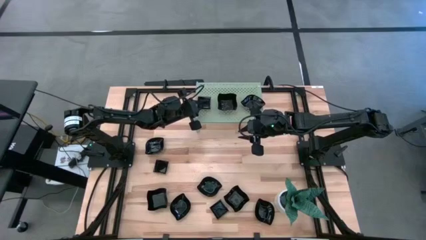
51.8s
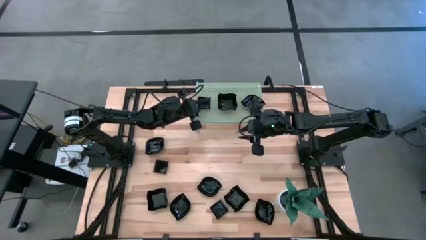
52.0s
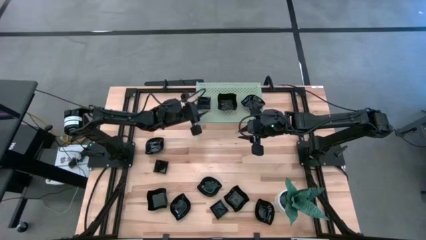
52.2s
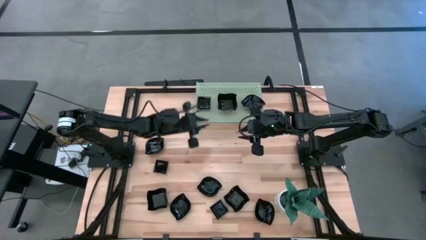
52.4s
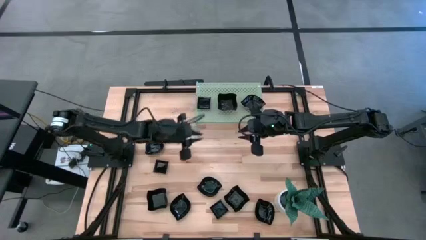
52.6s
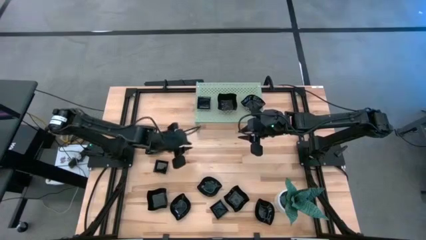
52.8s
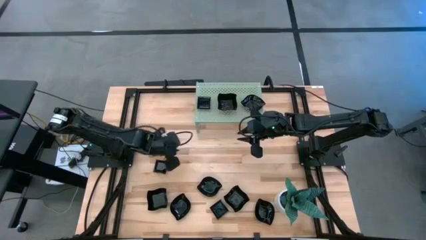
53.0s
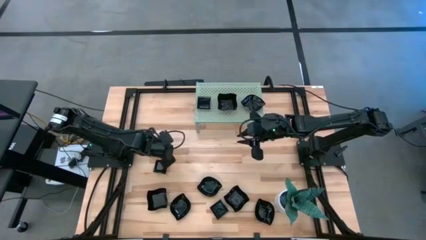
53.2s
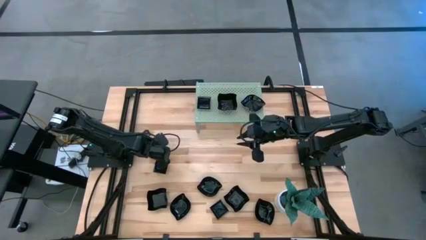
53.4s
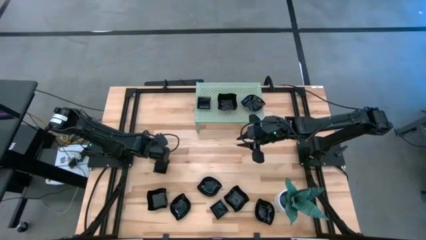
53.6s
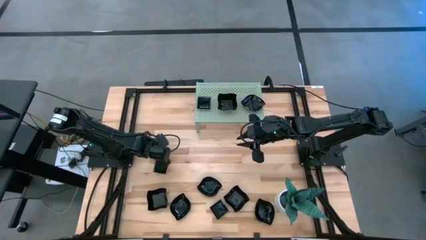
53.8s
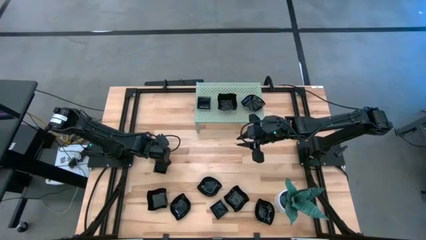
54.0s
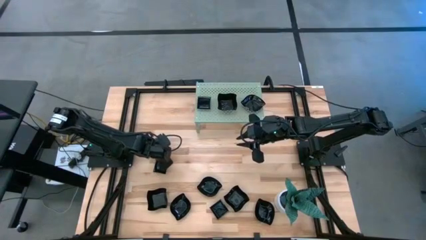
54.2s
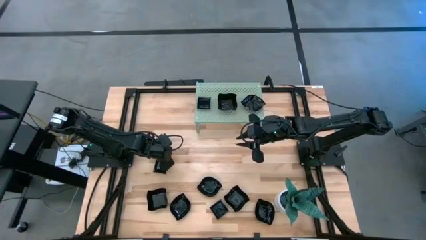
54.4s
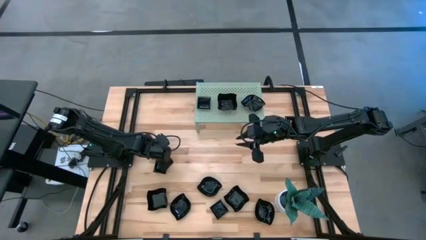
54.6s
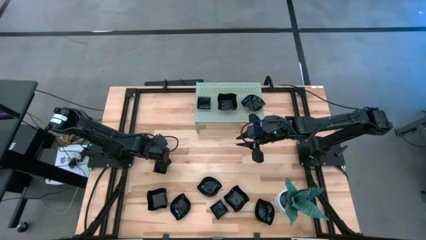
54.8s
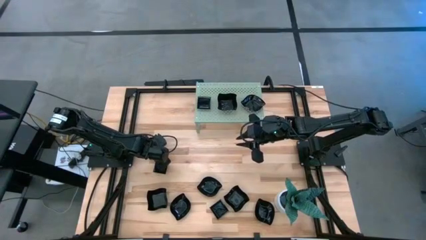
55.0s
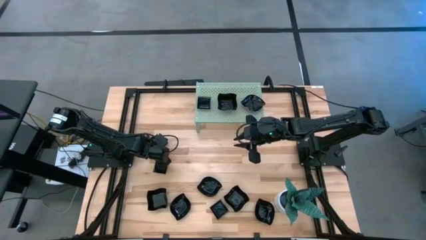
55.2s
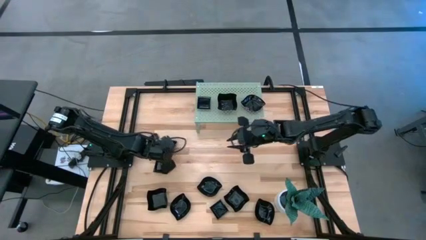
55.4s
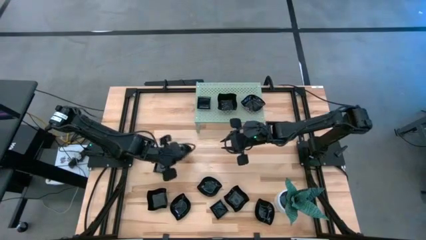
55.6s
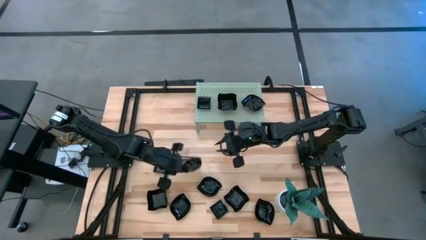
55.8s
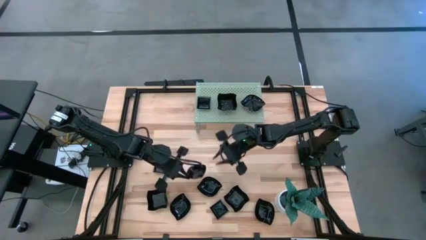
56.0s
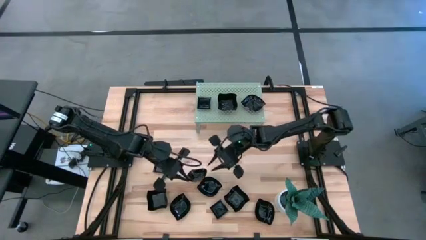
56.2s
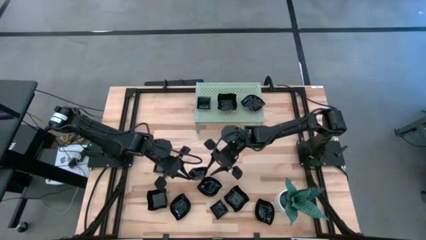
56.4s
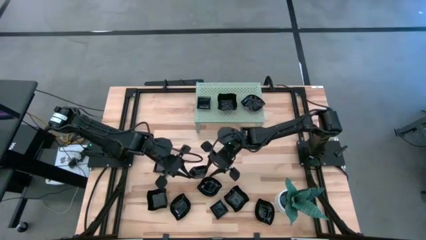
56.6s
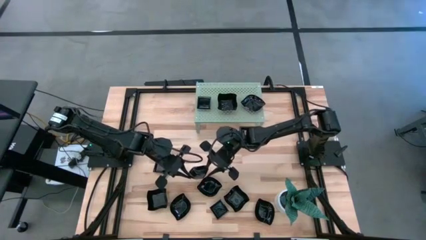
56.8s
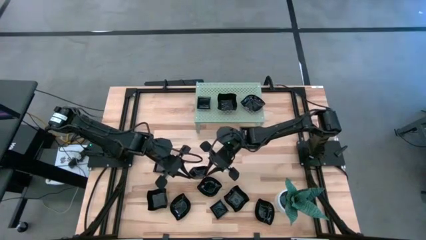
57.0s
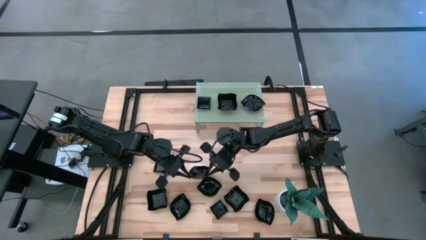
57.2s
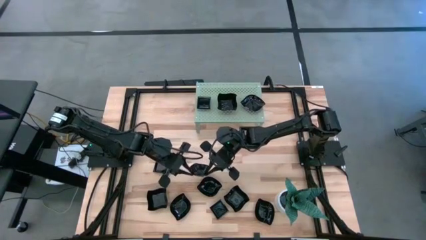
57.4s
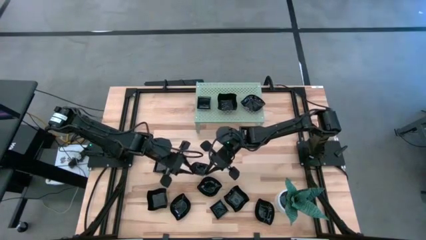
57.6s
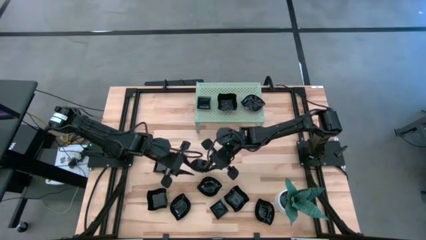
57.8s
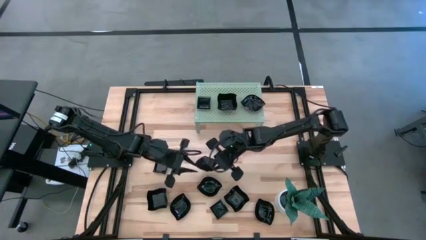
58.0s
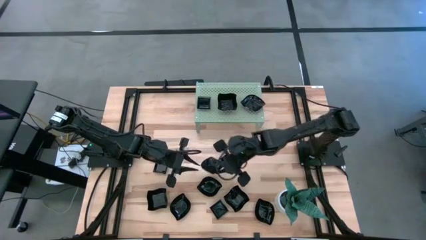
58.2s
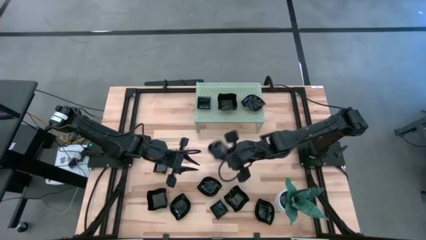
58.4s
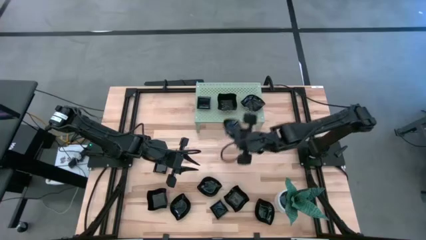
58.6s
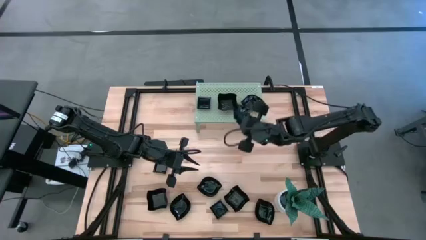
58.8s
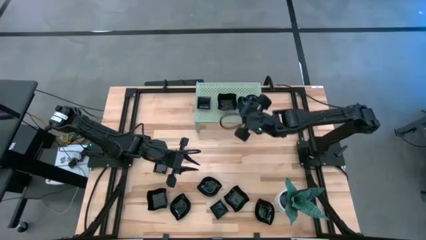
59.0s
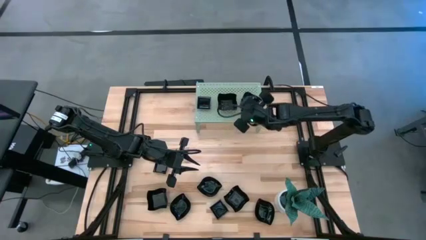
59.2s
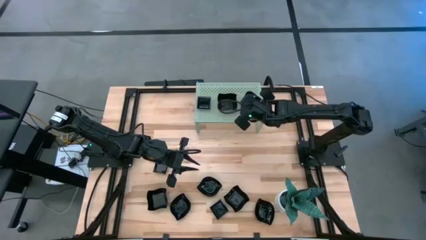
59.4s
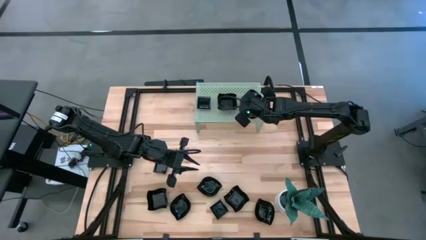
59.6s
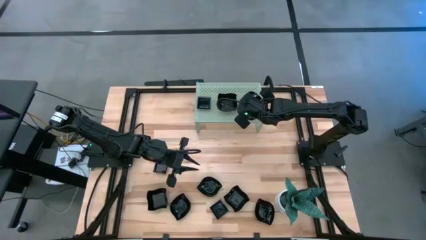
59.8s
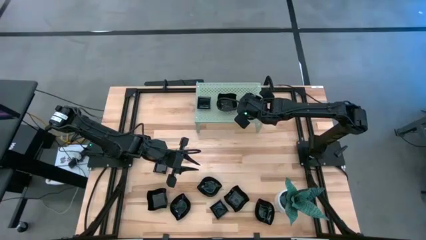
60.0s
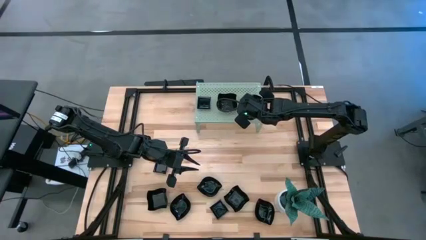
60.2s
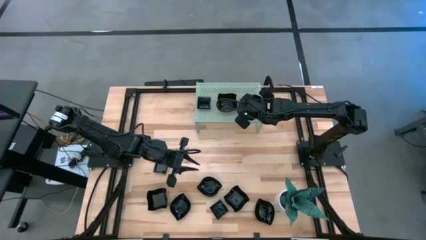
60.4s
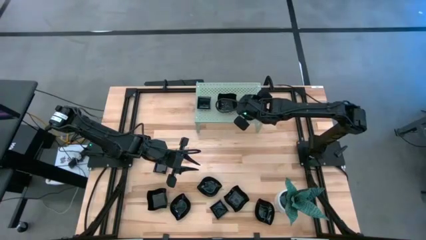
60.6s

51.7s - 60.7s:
Task: Pick & Place Mini shaped plates
Stack the leaf shaped plate on top of the other leaf shaped plate on the shelf

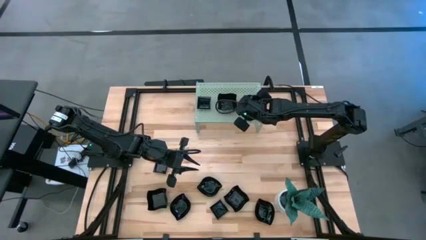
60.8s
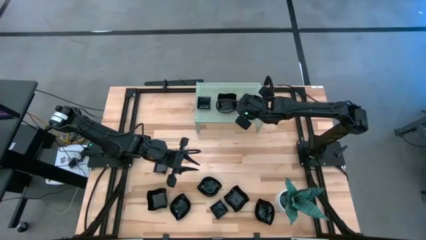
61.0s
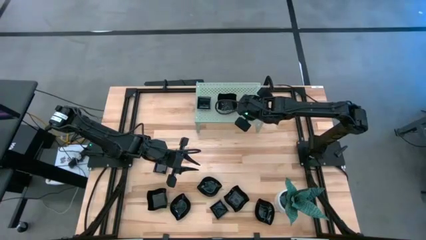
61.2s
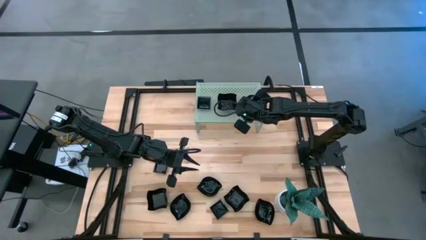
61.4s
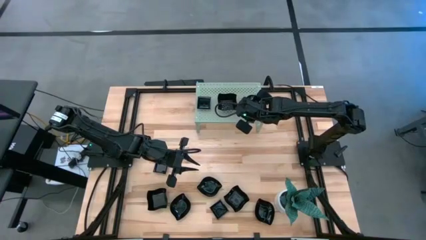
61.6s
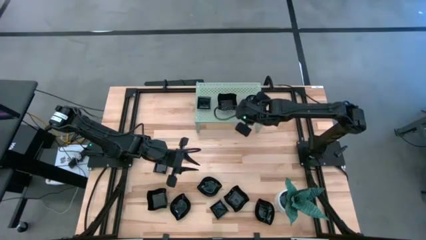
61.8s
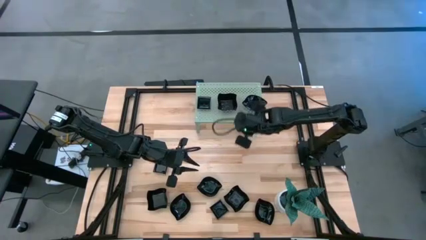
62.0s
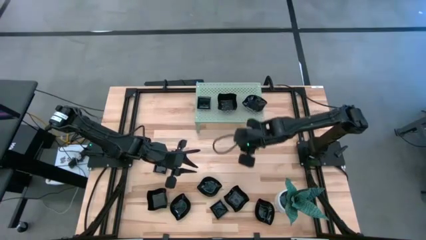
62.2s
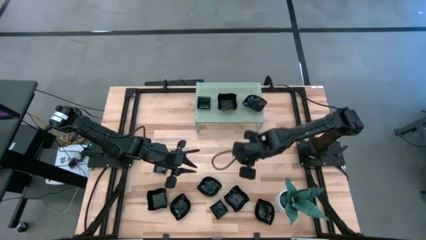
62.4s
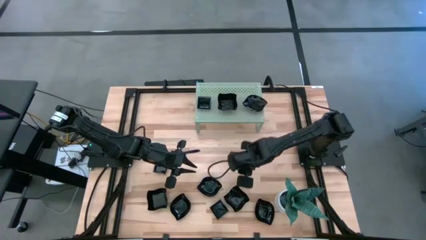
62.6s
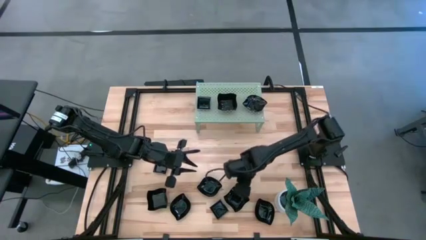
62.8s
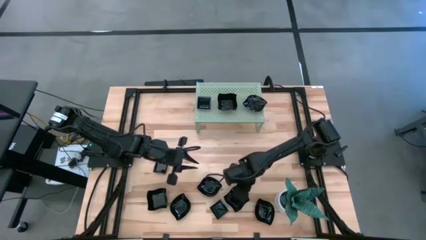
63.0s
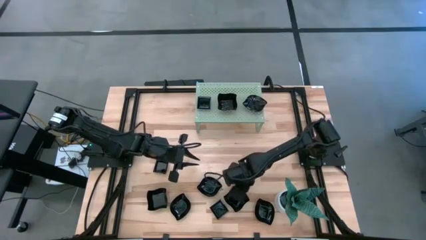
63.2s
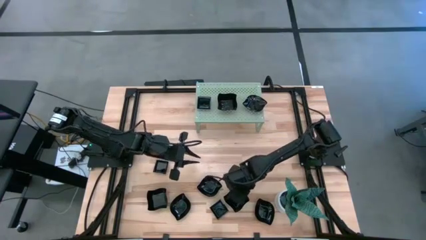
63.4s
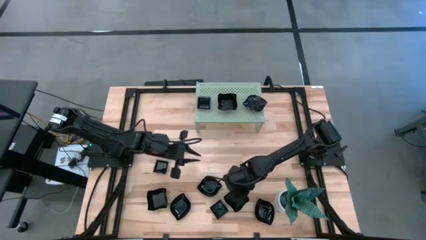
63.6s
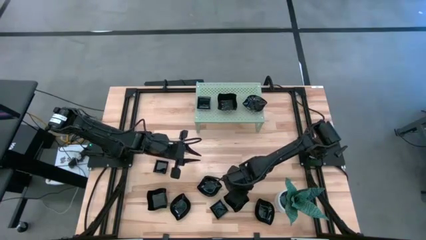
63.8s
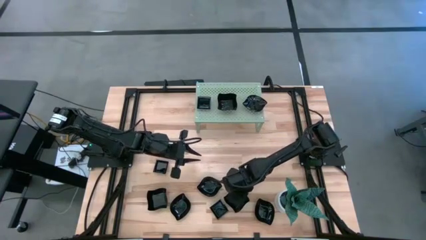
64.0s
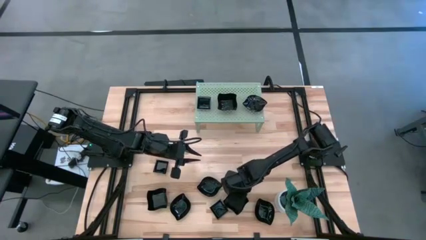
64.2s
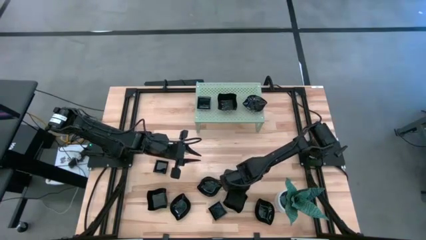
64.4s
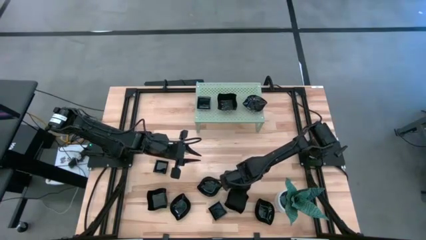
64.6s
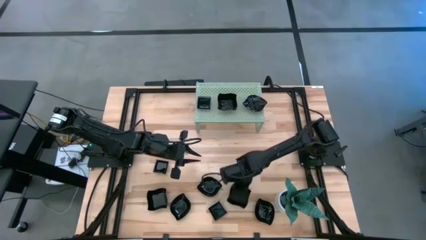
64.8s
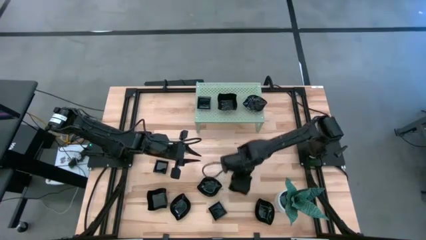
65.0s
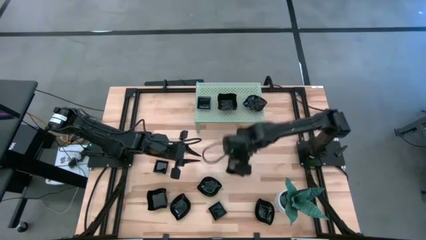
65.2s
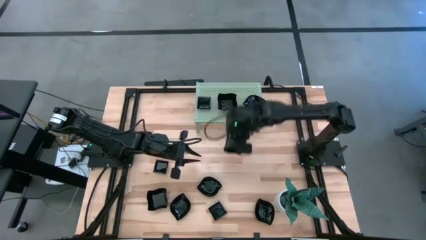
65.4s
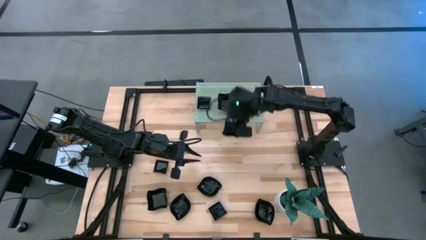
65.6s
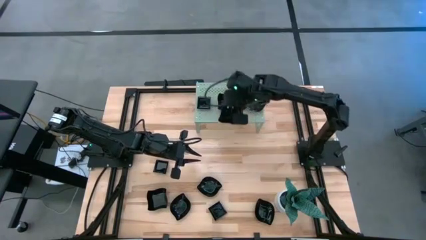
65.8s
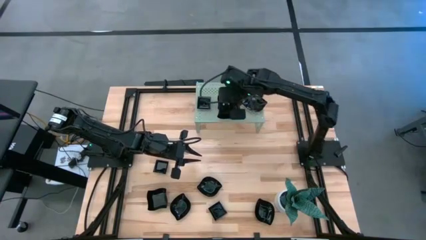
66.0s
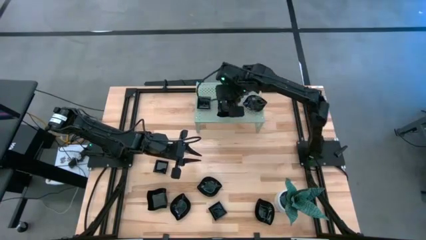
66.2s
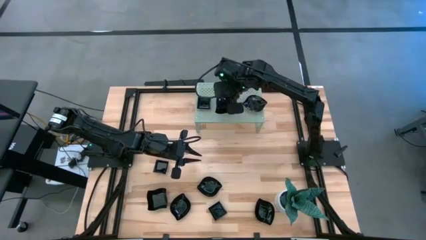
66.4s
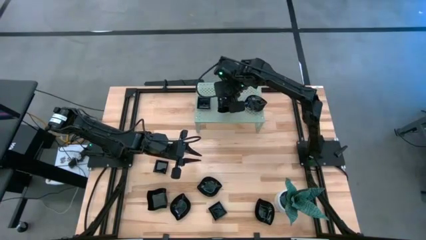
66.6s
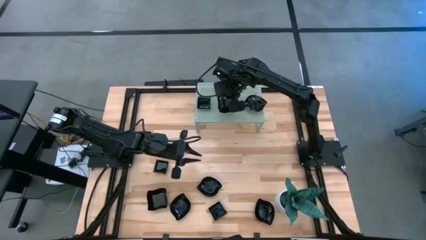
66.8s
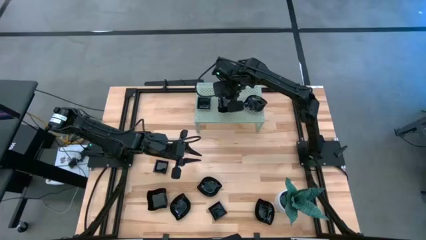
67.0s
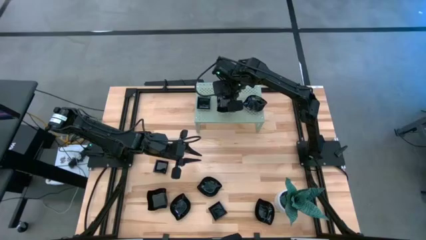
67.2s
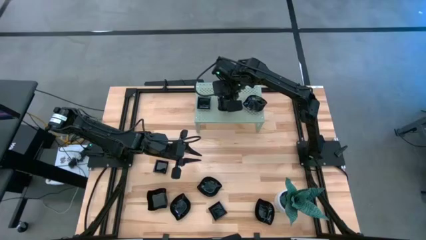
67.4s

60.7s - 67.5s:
Stack the distorted plate on top of the other distorted plate on the shelf

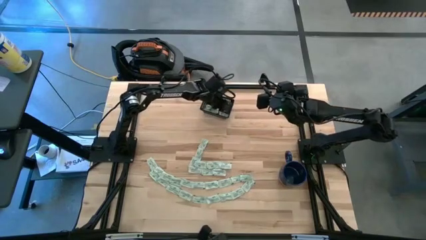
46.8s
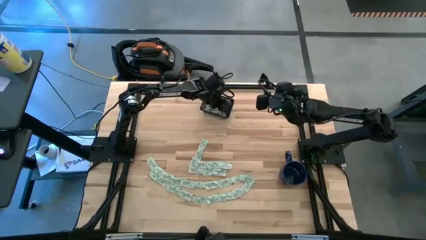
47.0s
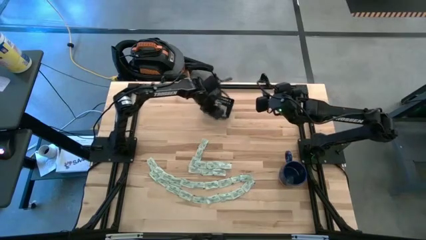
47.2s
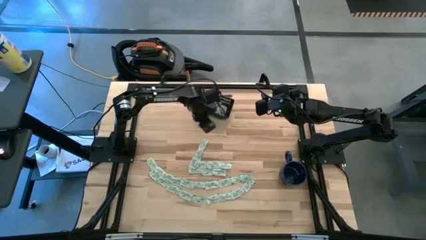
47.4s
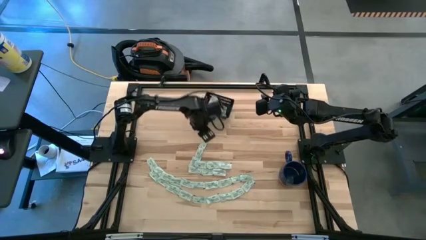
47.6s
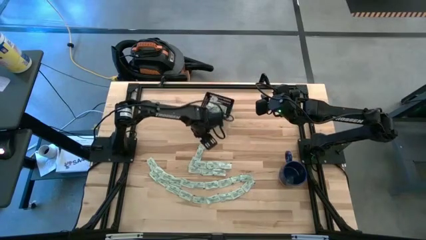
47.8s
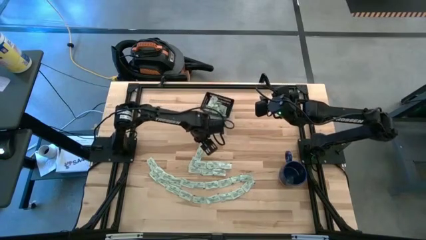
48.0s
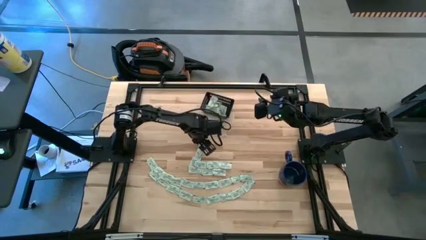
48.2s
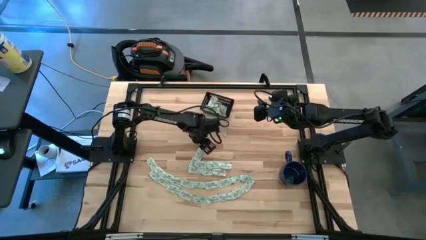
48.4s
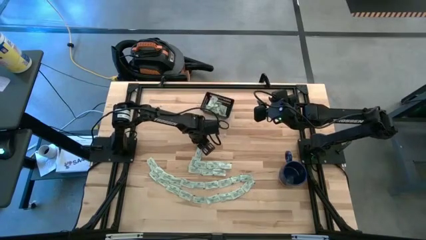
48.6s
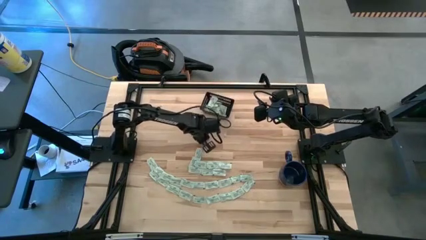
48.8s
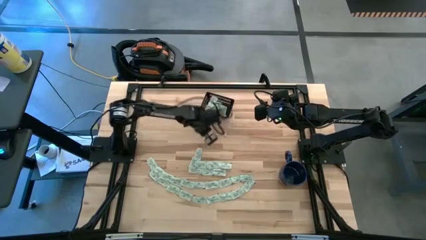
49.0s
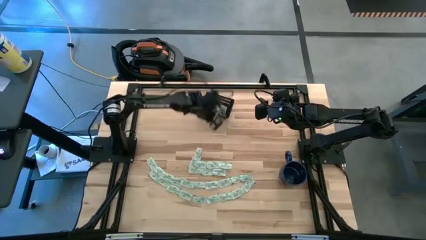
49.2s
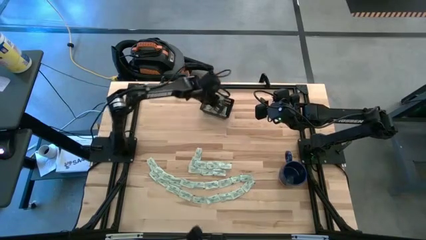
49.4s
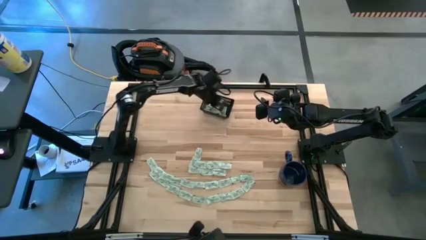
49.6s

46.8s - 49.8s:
Task: Pick and place Stevia / Truvia into bins
Put the stevia packet into the black bin
